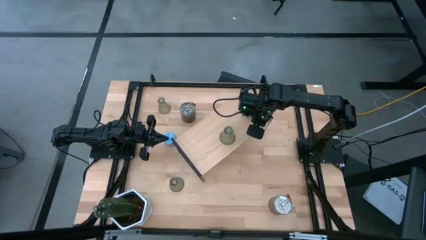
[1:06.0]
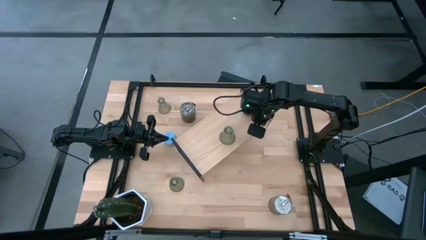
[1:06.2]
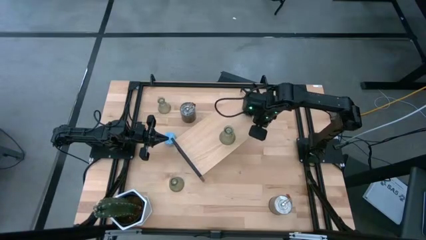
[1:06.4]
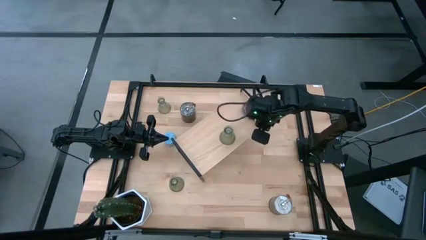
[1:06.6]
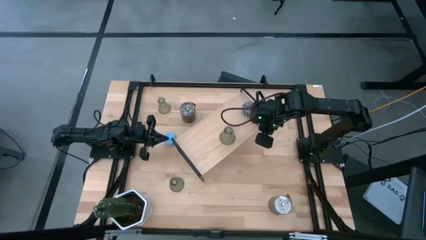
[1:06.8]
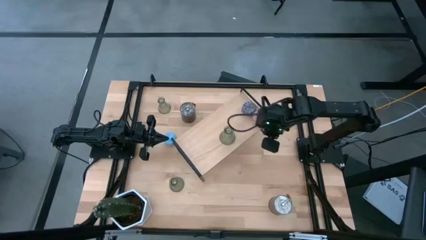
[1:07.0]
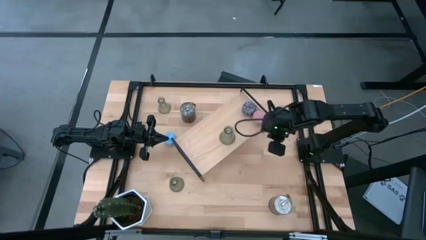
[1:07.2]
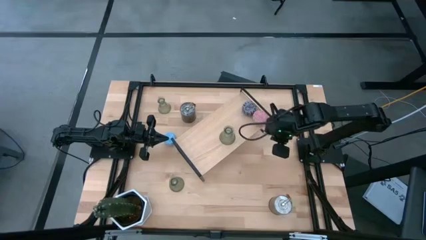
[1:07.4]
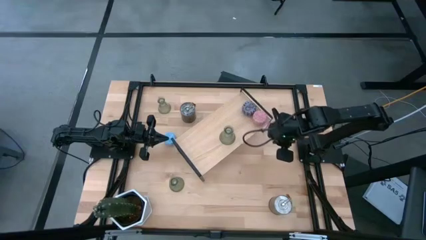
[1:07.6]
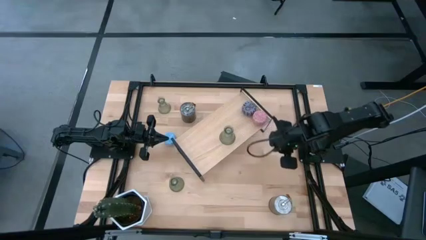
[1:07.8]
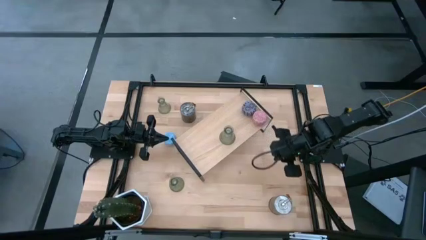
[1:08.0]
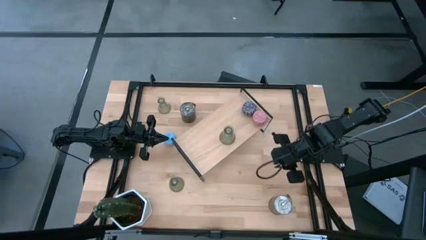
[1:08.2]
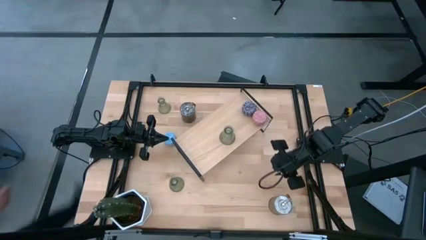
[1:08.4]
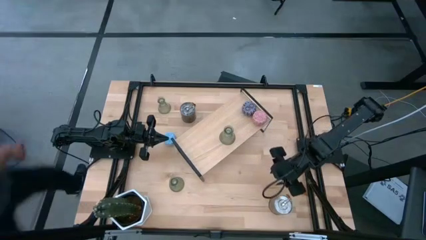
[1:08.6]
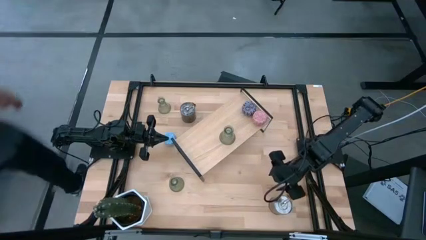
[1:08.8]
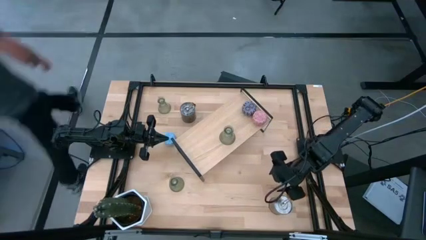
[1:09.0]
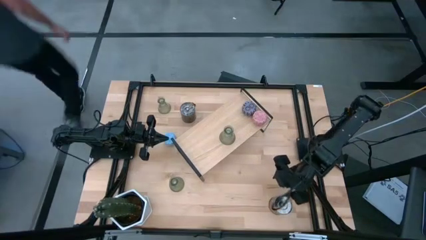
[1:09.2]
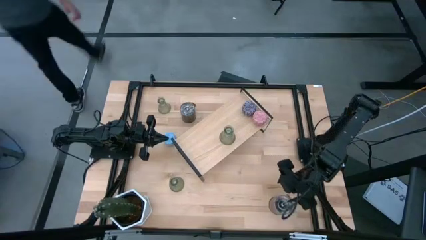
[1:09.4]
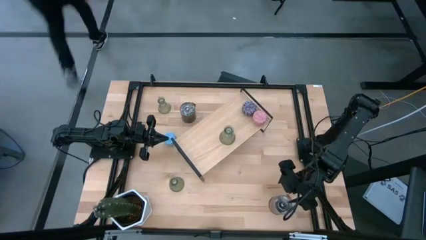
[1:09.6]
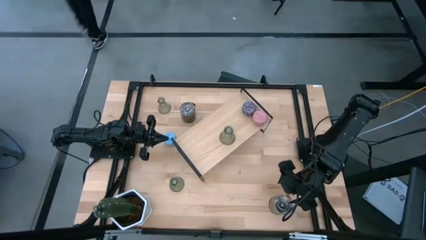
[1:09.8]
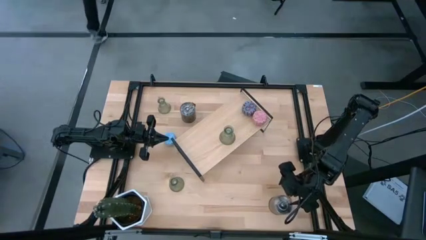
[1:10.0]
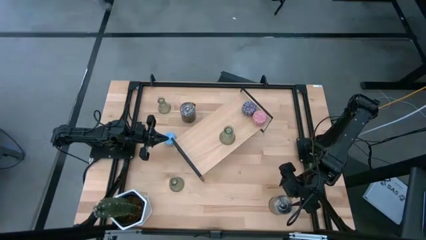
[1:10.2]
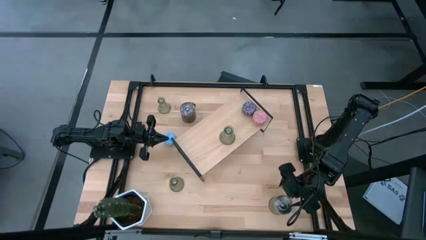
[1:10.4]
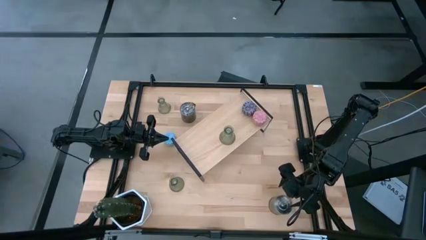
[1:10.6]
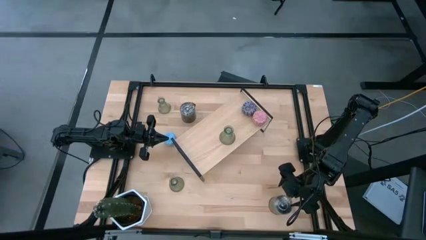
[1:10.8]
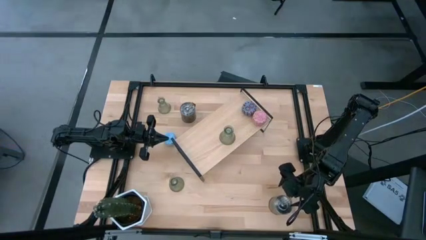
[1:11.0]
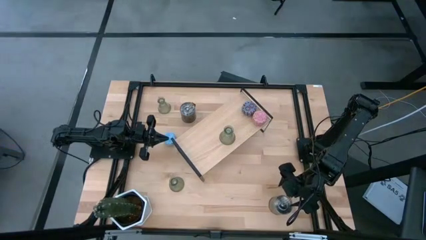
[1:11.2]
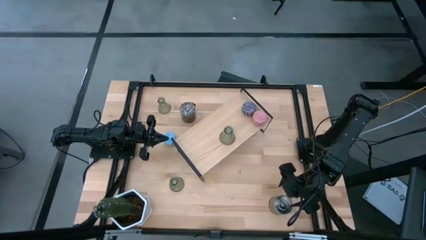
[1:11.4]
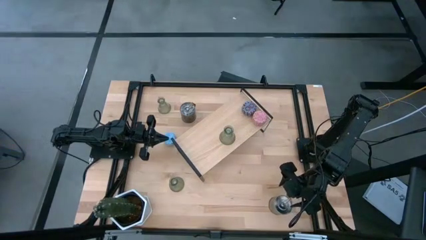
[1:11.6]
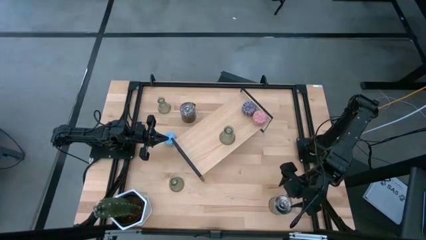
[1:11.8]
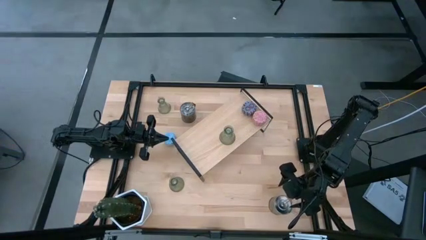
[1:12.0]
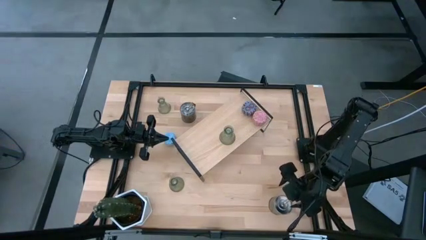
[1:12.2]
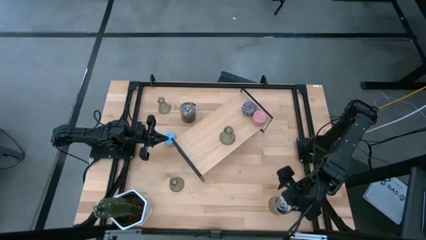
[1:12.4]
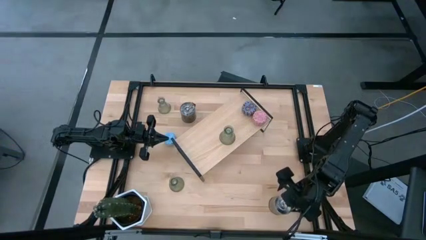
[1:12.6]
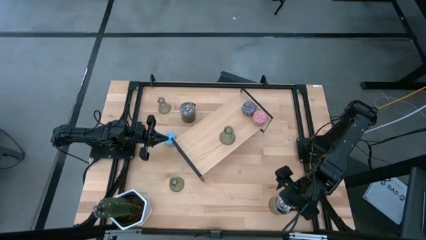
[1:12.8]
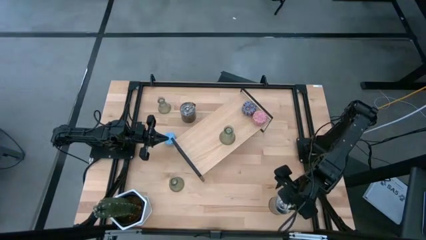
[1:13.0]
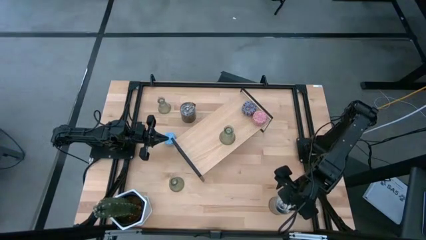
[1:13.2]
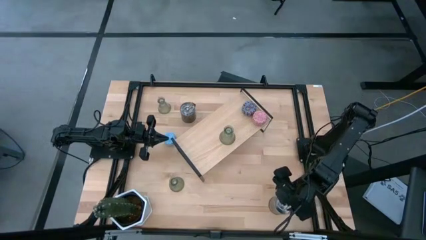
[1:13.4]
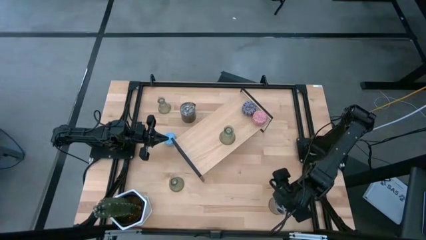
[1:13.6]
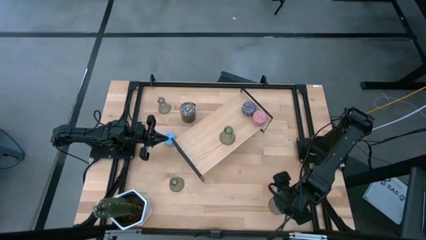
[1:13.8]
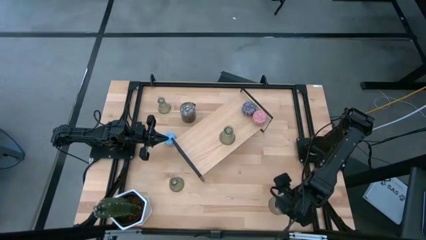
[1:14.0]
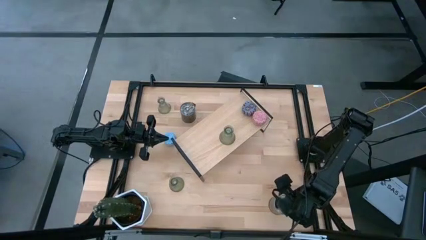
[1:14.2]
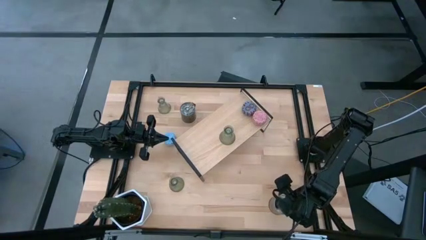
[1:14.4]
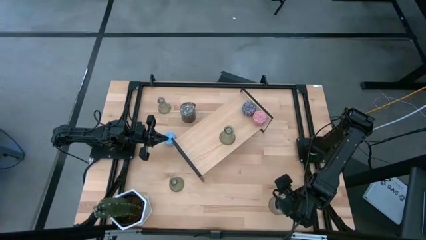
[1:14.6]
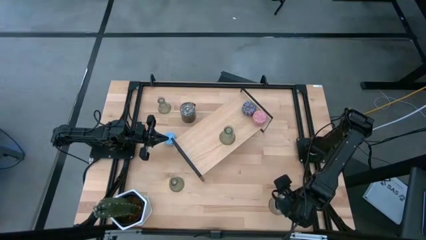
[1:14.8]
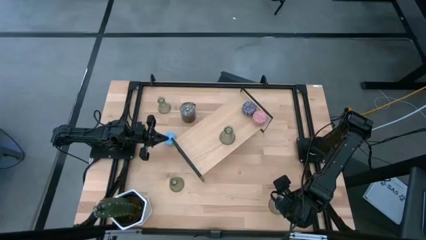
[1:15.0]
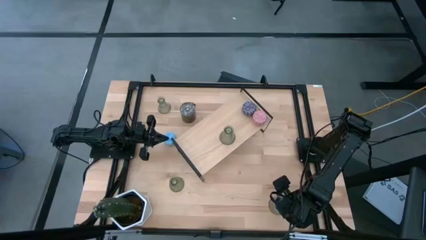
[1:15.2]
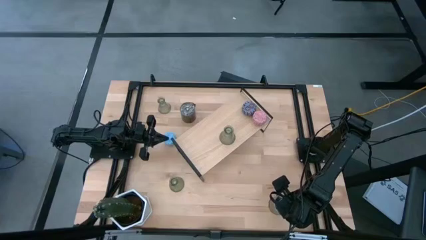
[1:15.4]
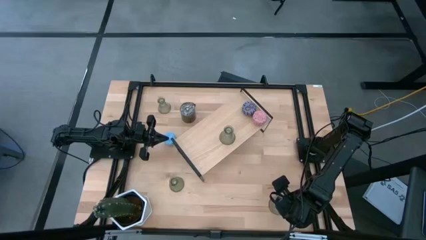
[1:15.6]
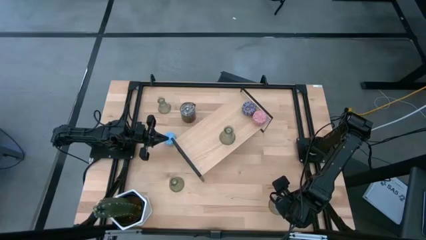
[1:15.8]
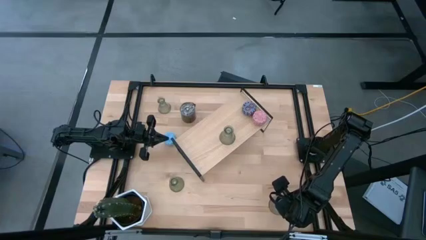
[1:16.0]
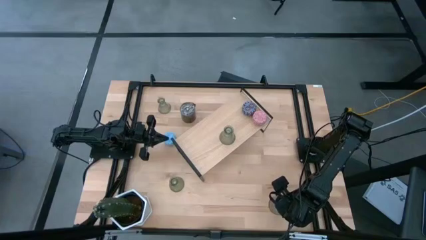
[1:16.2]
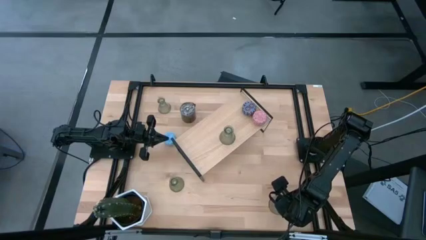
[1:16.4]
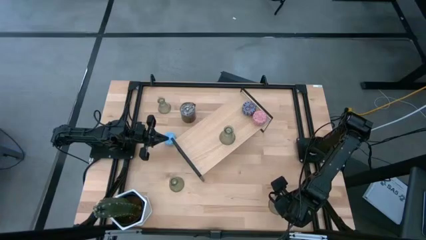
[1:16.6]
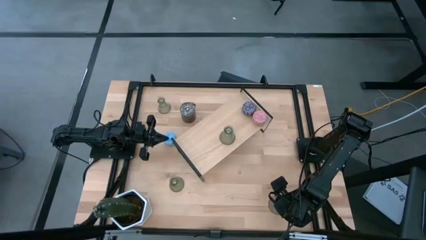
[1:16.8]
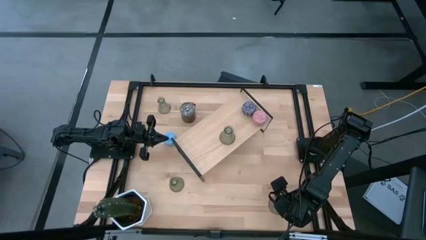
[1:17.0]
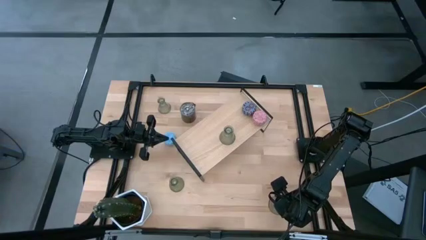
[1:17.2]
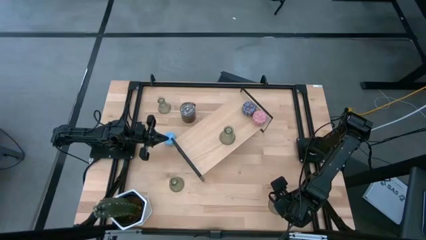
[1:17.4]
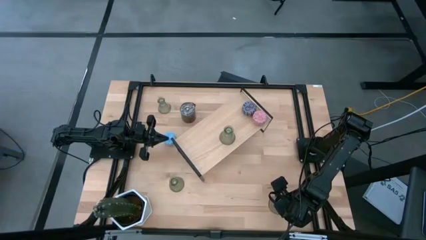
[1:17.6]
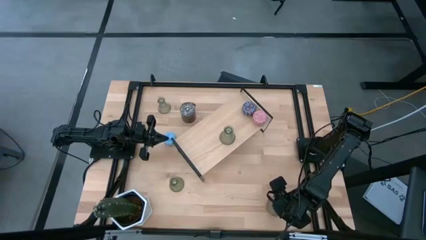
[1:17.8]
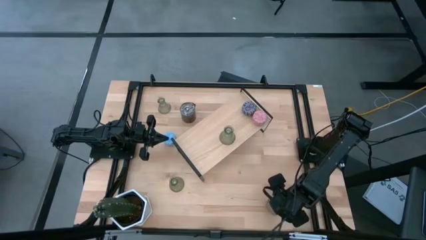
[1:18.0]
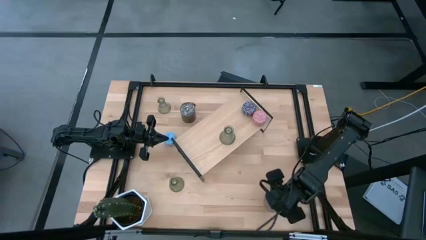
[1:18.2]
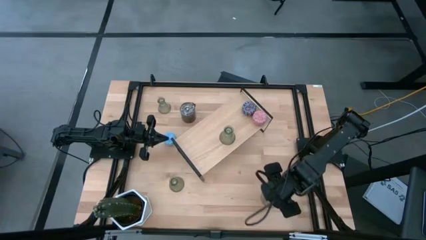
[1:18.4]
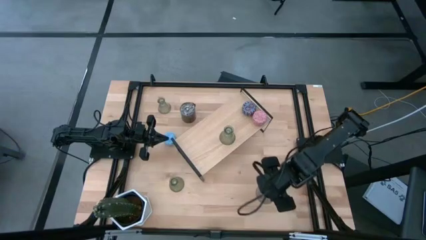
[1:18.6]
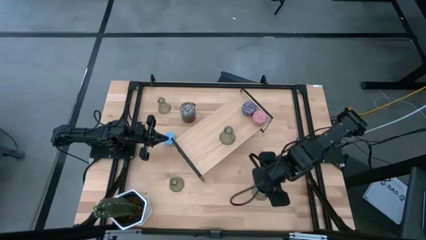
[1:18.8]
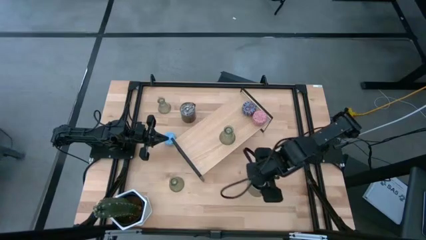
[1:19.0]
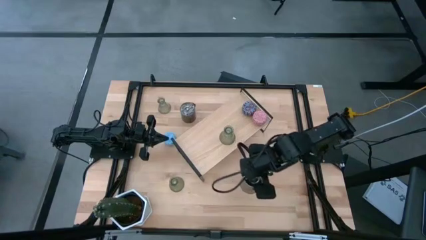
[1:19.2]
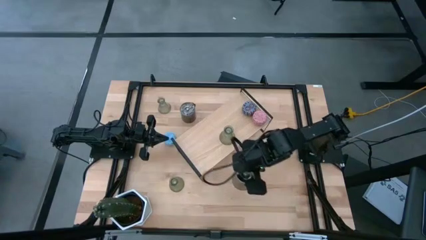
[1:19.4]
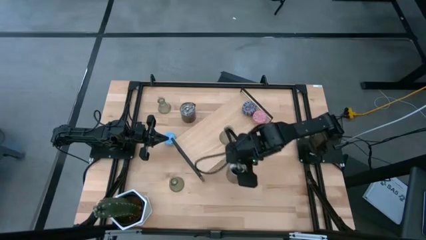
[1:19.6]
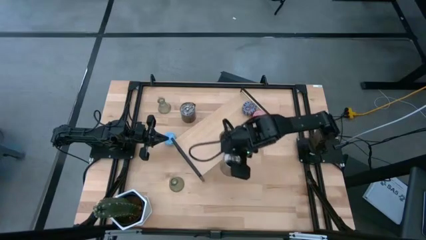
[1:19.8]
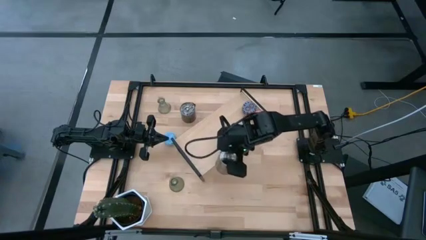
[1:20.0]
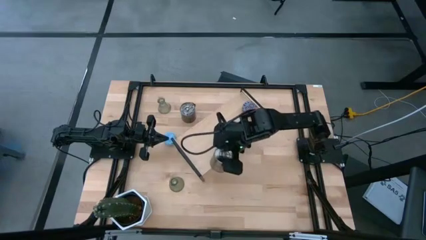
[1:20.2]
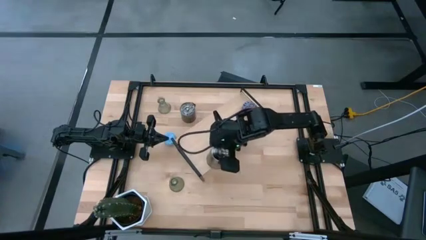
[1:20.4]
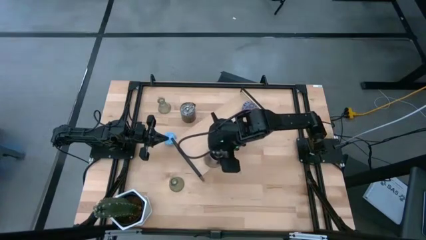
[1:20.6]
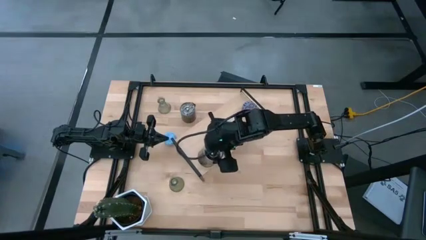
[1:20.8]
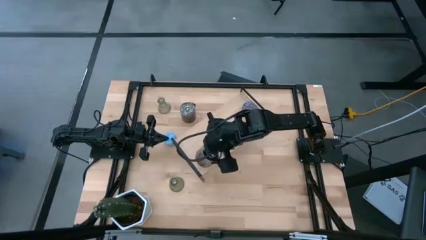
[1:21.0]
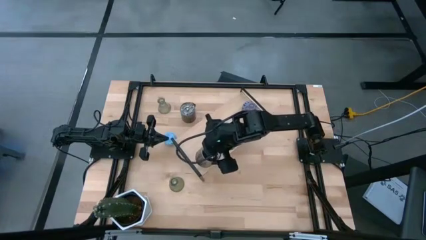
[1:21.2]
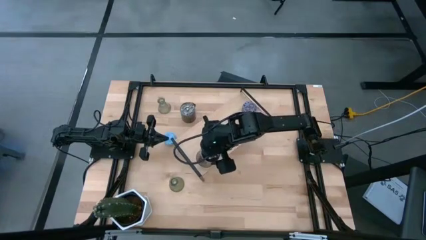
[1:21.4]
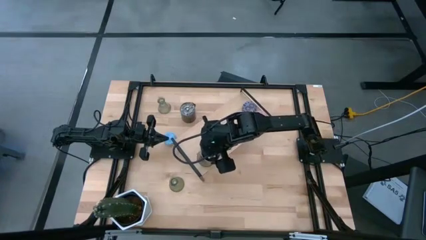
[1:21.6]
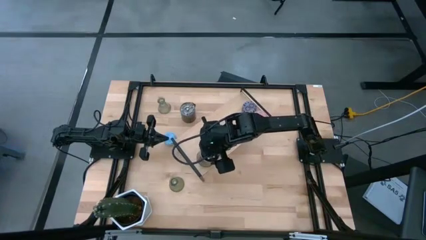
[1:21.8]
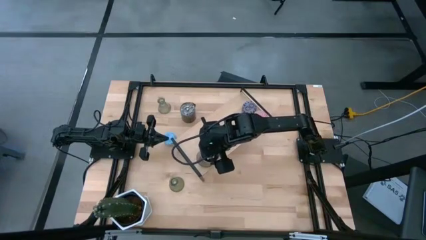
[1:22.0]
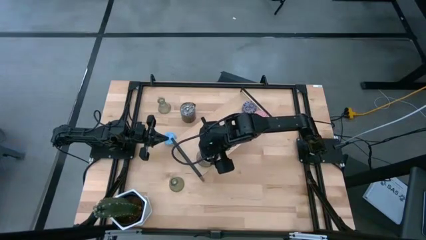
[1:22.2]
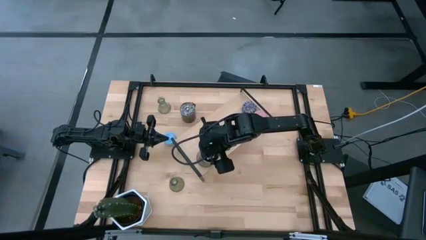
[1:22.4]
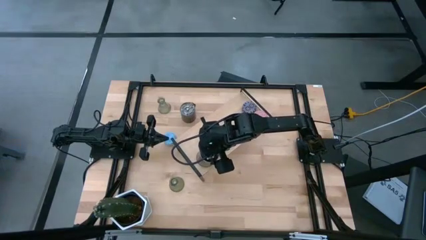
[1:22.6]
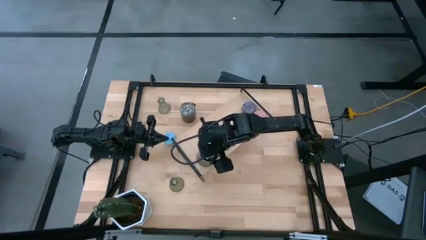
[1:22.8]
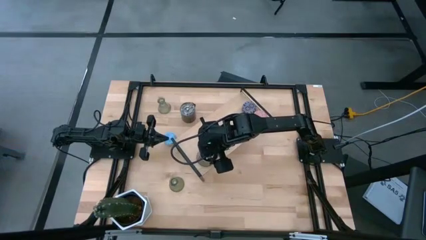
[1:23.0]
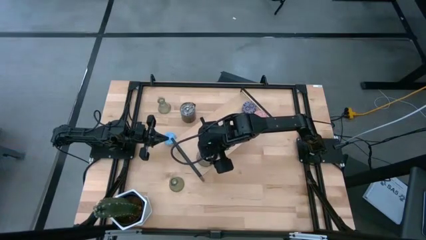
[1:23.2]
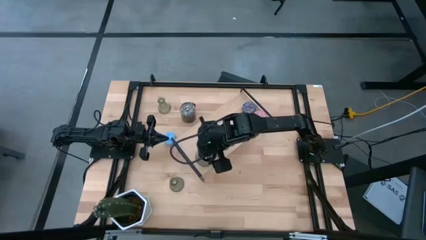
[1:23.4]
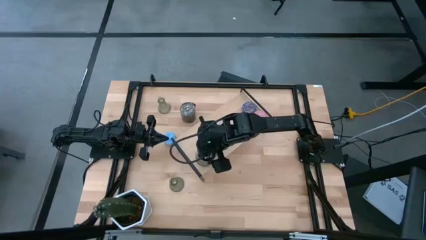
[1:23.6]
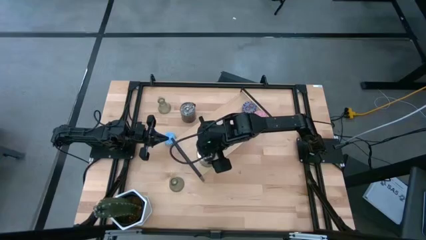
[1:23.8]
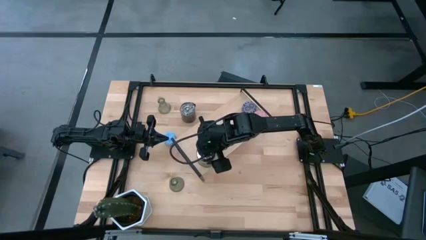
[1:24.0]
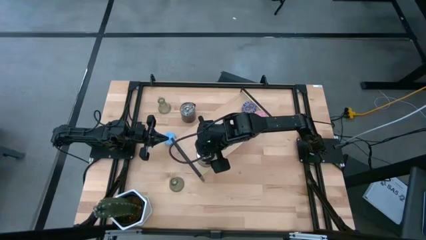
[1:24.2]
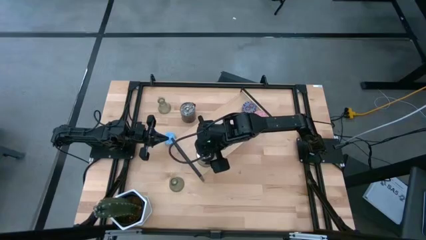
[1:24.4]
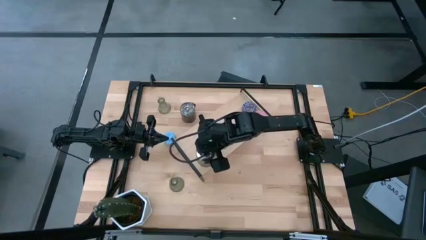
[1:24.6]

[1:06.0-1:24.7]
Task: Pick & Place candle stick holders
Put the bottom silver scented candle on the shelf
